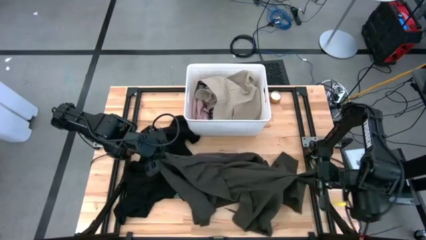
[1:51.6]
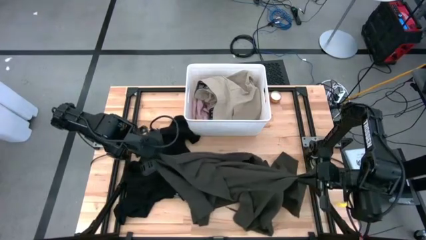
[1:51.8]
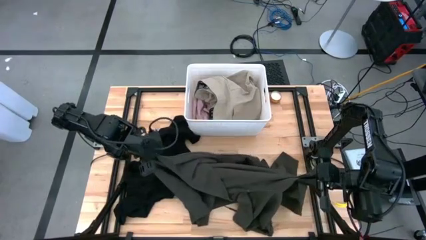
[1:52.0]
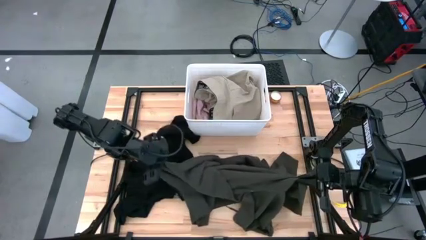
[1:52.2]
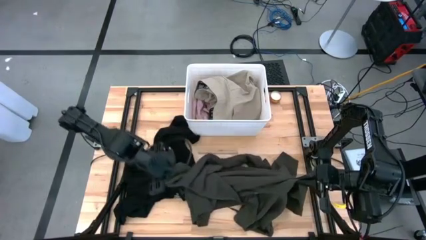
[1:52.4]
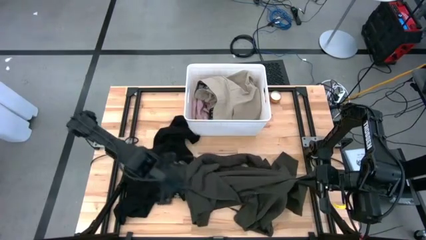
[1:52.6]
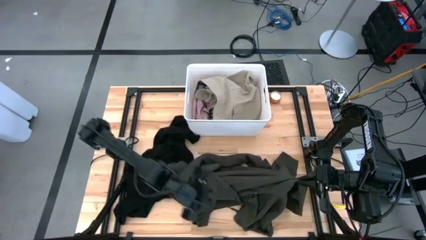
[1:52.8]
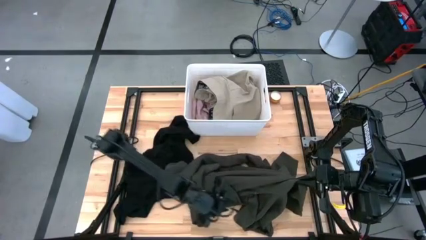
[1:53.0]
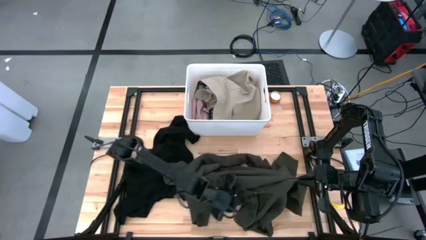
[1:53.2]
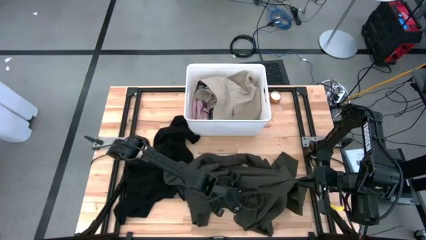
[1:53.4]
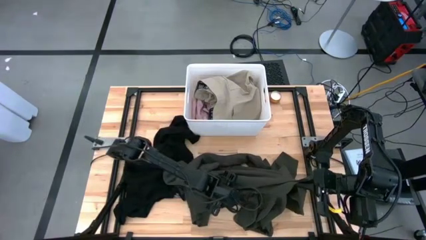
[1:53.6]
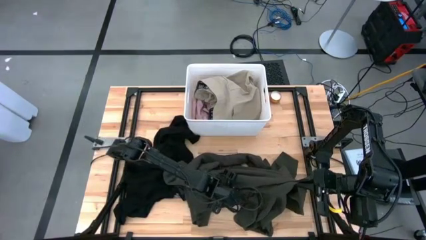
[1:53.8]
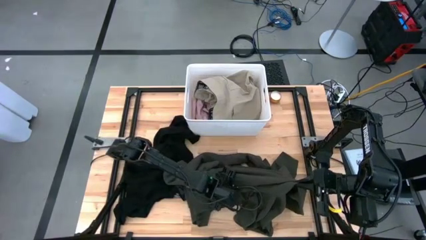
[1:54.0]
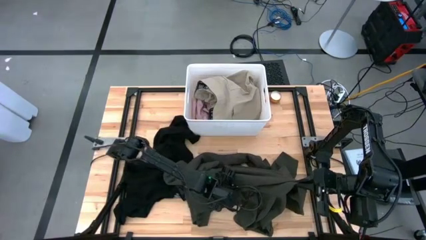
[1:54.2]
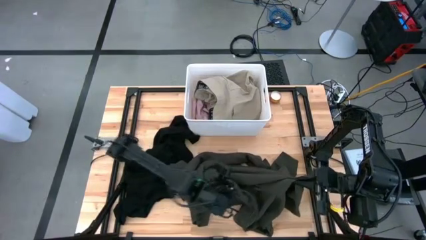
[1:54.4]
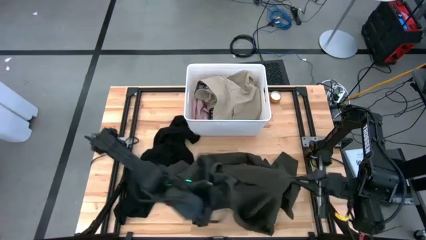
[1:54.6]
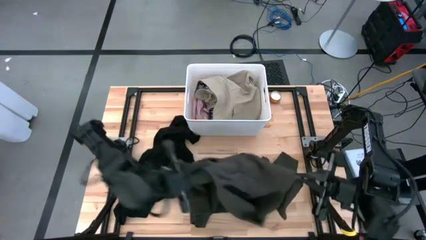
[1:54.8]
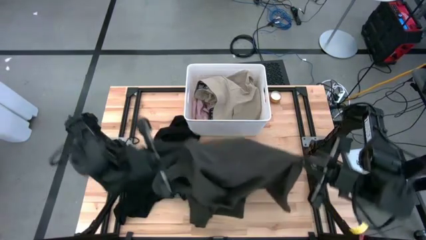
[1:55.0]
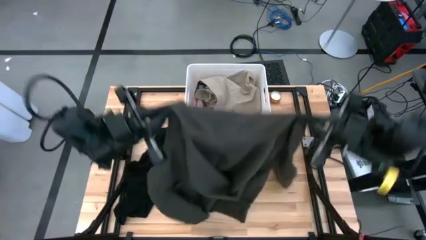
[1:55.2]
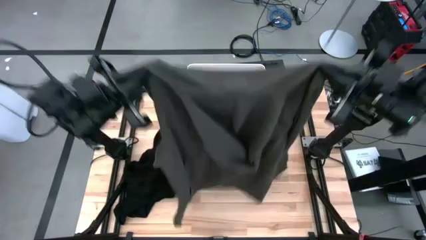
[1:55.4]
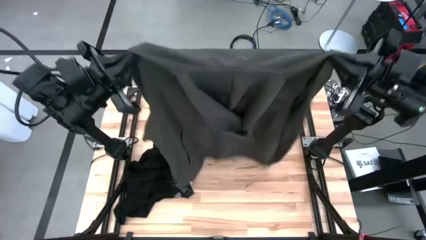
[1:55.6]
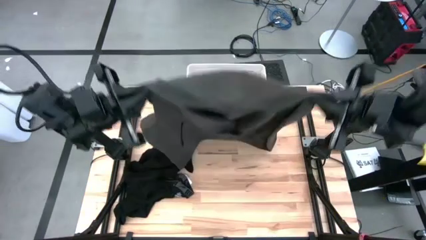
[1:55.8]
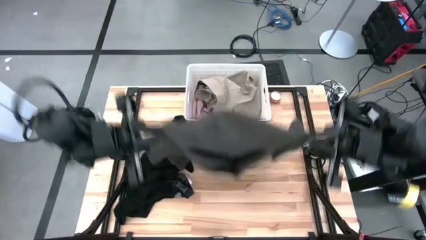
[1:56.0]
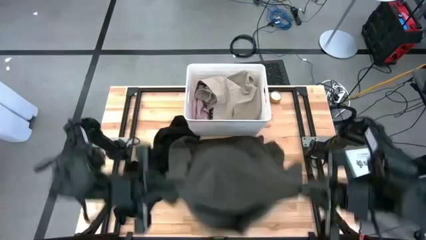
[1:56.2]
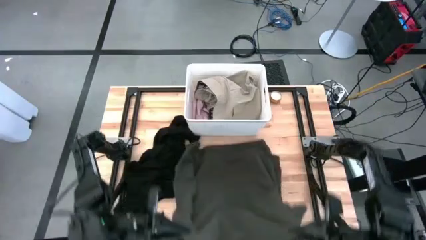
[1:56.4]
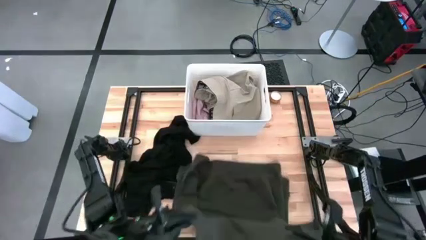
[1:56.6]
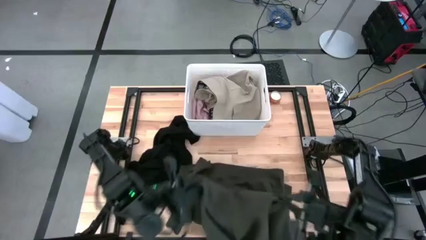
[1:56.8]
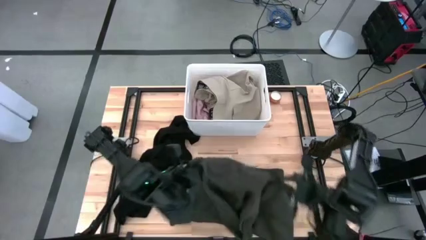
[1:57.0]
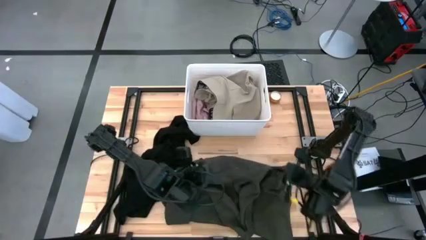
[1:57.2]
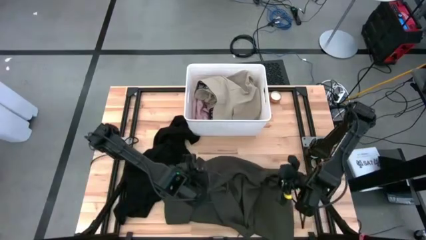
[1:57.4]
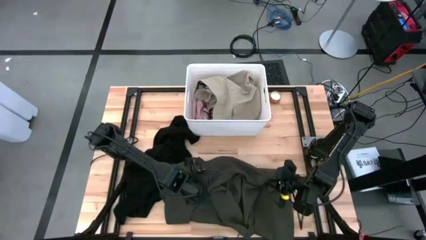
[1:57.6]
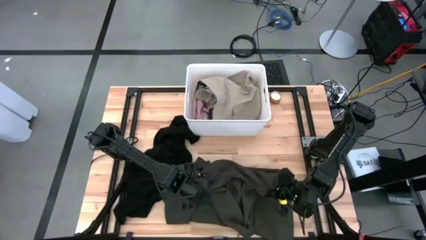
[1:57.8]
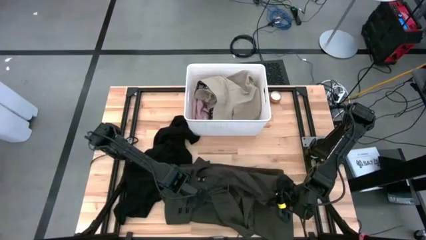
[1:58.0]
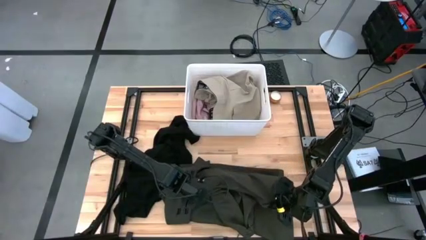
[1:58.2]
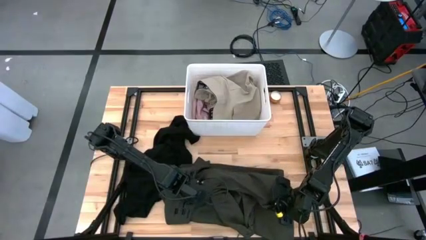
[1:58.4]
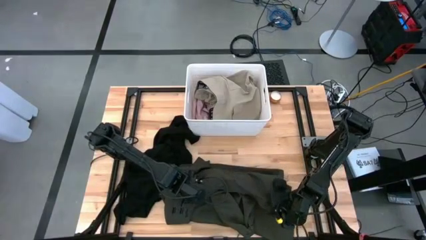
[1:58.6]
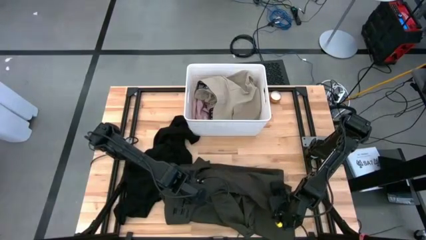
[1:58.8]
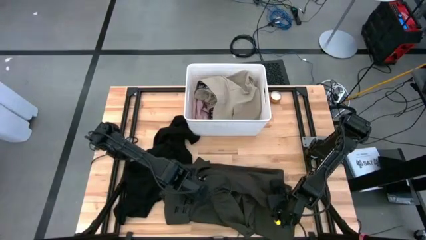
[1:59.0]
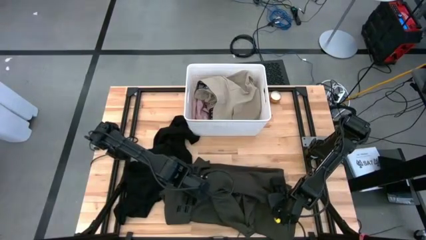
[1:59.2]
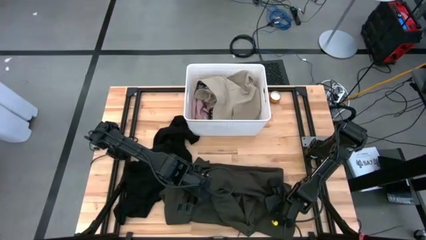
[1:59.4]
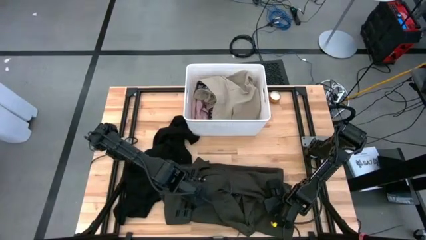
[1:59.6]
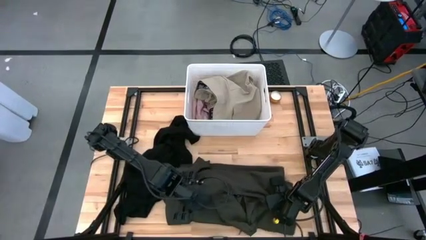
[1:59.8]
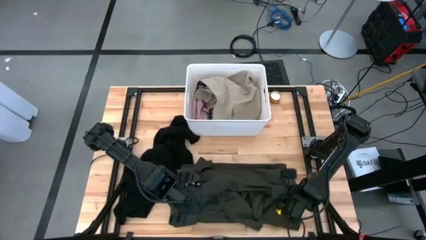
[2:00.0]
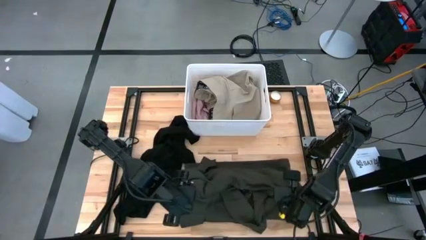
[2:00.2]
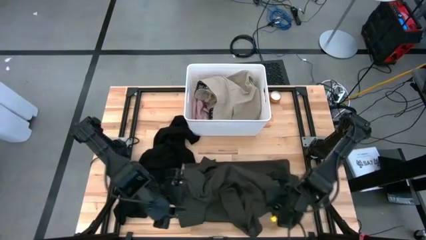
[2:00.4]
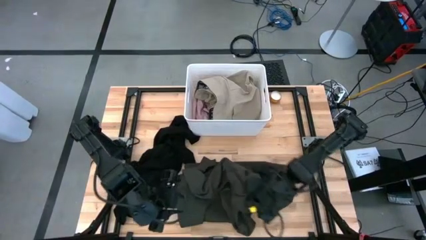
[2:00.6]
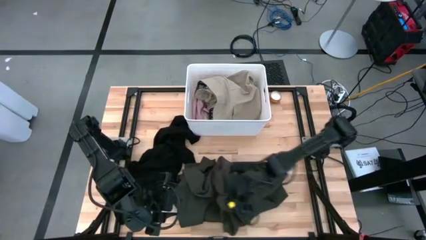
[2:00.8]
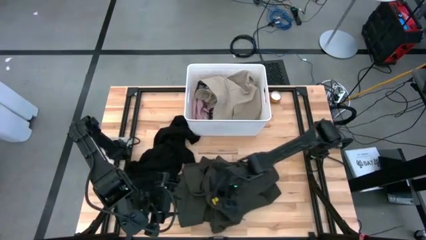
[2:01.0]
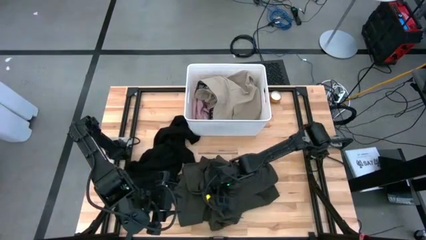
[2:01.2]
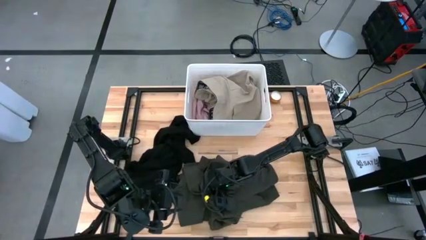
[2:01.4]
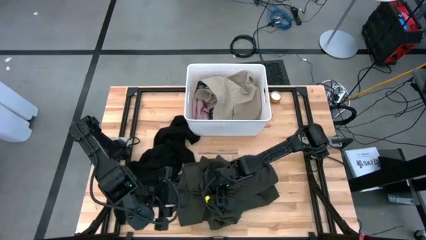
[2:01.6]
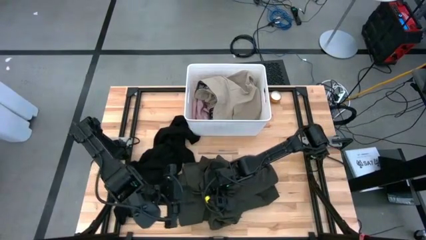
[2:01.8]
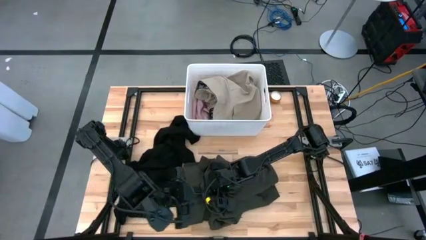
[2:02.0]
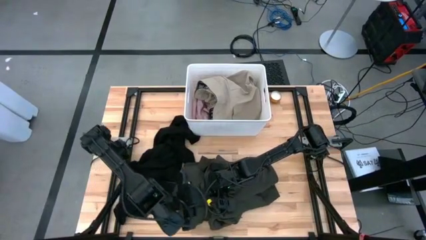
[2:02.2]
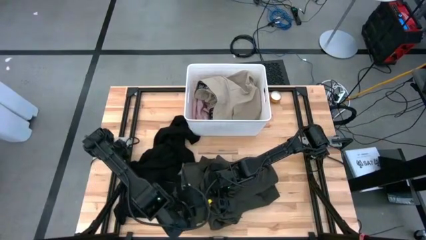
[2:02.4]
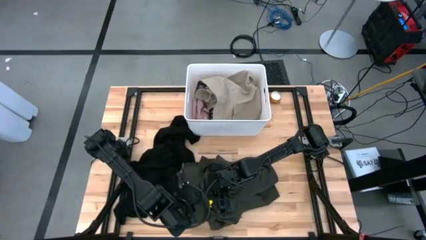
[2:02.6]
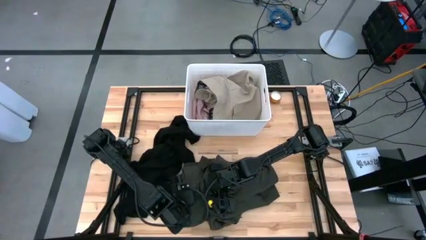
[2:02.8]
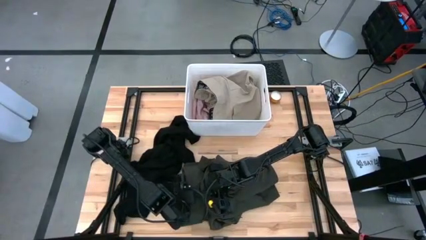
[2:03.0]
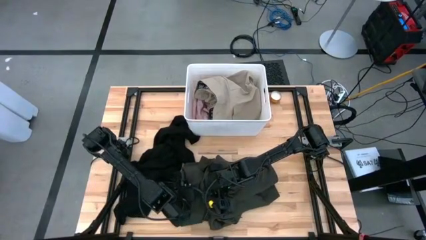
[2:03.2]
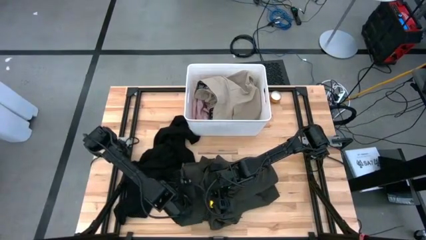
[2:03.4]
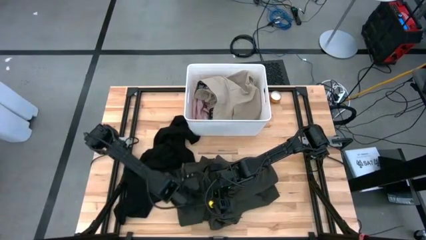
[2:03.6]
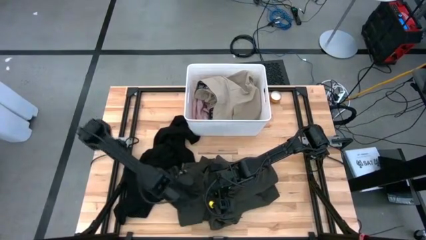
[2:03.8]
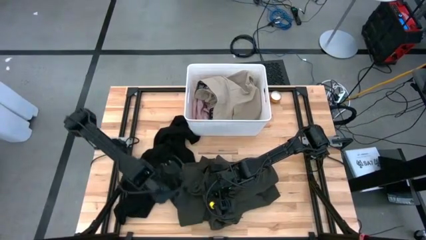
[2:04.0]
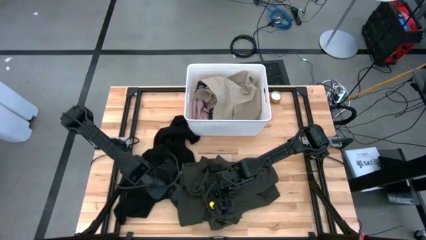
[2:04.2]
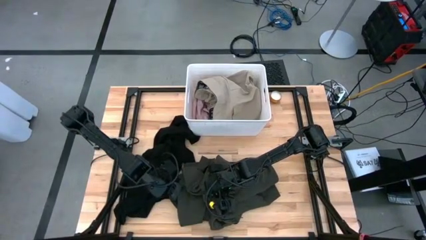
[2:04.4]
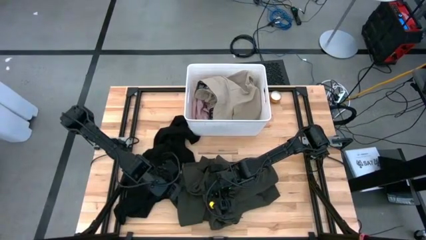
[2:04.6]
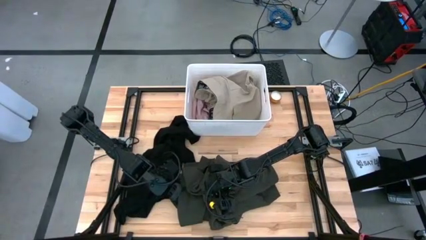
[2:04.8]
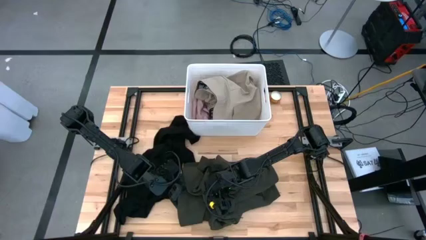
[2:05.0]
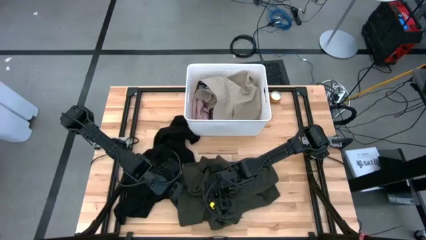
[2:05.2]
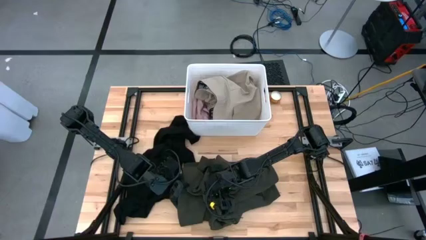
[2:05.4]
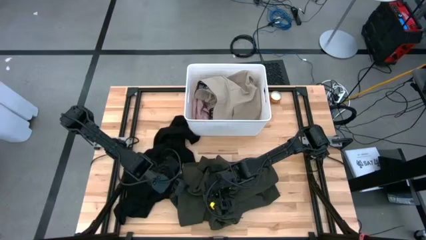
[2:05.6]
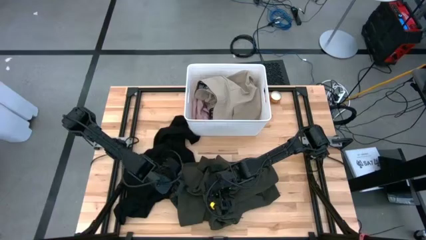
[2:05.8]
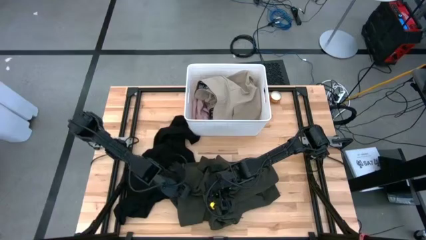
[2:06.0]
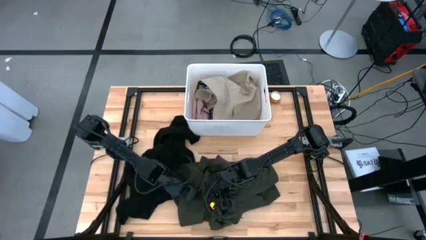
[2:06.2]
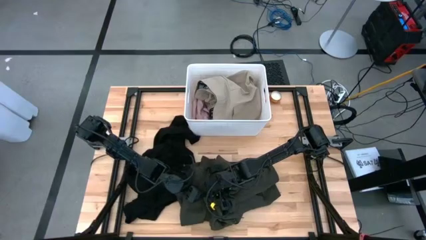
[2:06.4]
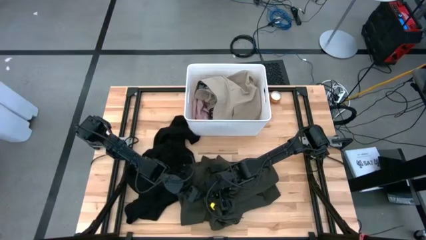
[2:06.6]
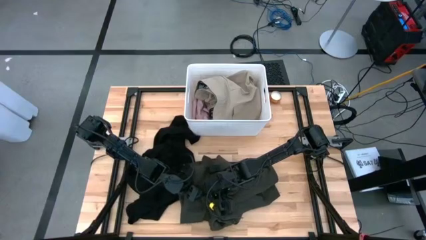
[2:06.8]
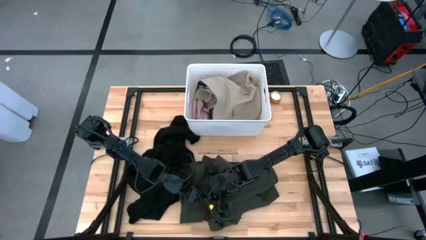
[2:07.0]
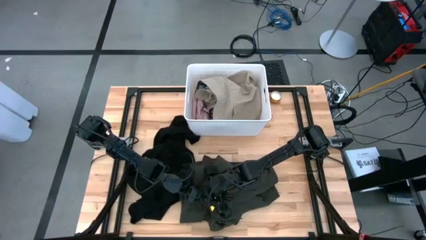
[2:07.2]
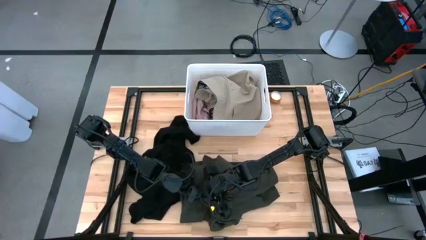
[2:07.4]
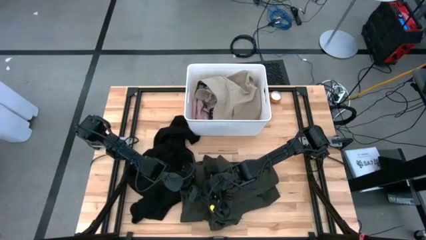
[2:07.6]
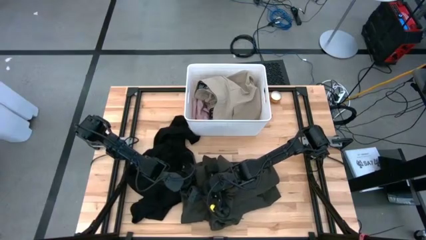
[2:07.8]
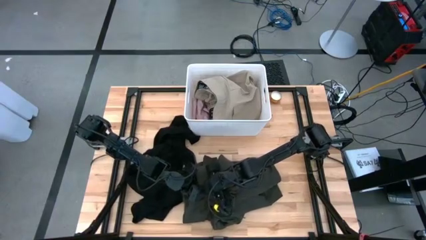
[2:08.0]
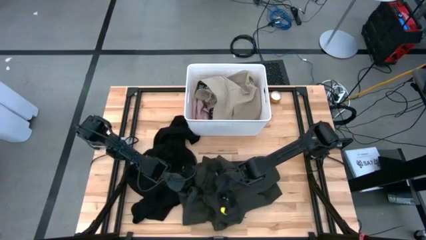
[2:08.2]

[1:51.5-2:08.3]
Task: Sort clothes
Put the gray hoodie into the white bin
